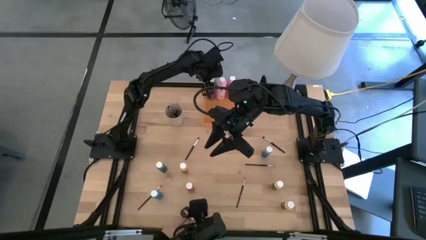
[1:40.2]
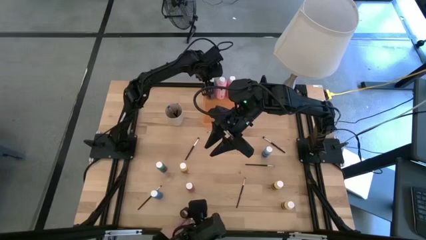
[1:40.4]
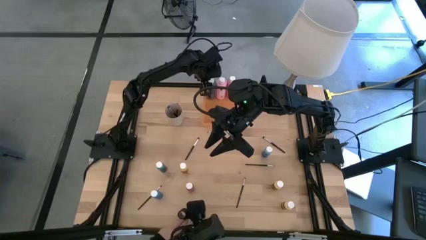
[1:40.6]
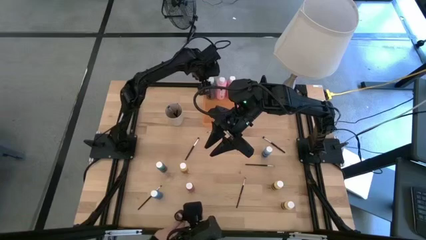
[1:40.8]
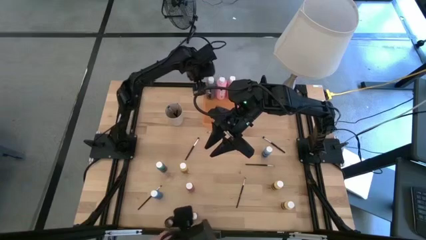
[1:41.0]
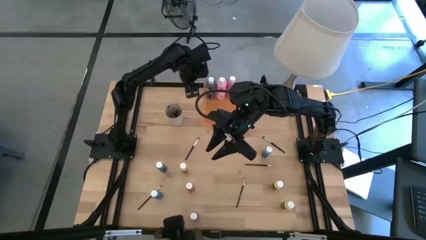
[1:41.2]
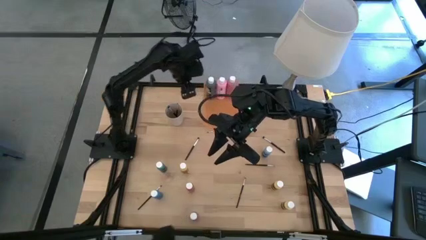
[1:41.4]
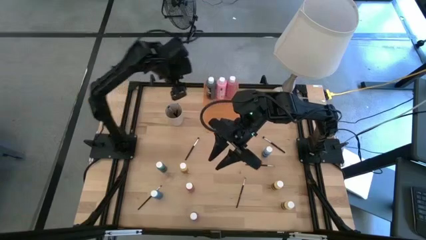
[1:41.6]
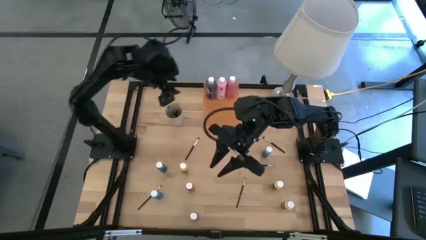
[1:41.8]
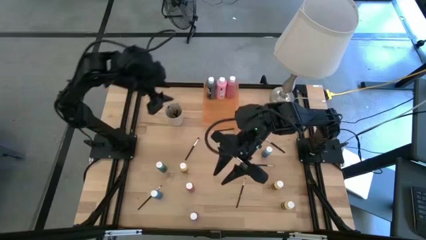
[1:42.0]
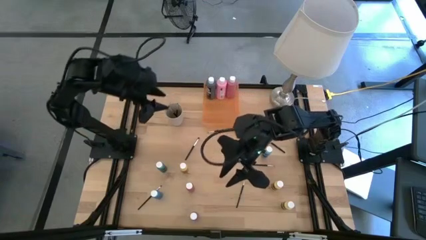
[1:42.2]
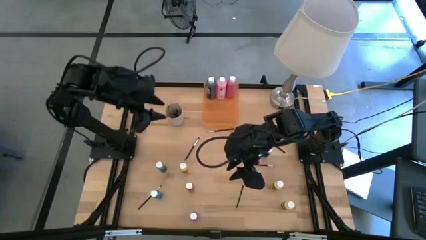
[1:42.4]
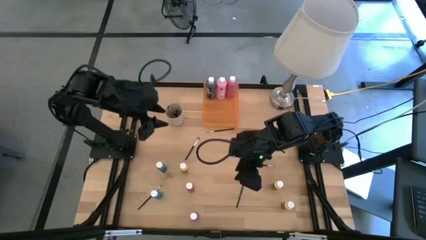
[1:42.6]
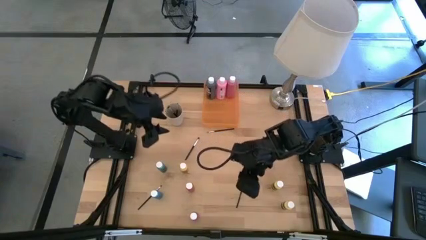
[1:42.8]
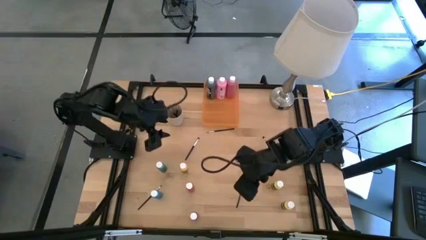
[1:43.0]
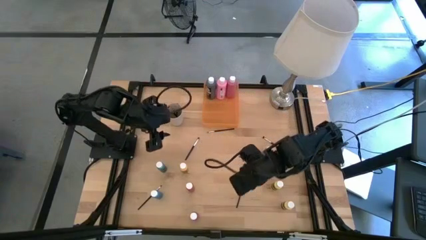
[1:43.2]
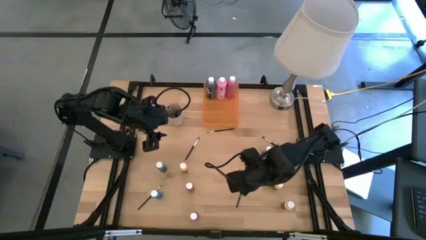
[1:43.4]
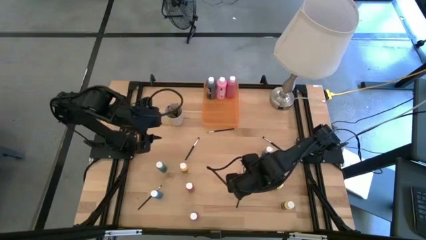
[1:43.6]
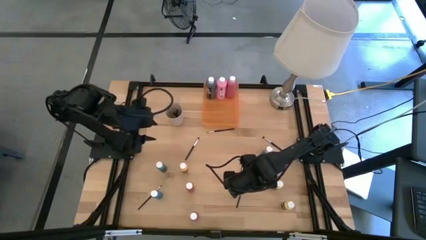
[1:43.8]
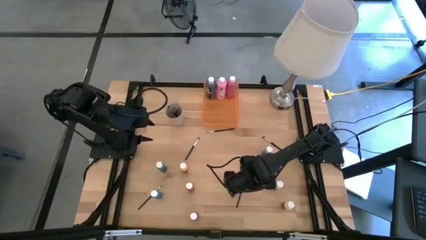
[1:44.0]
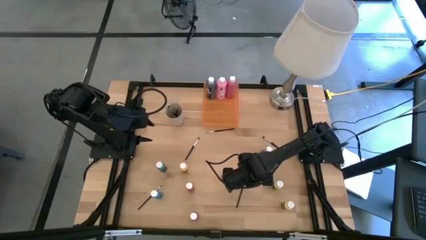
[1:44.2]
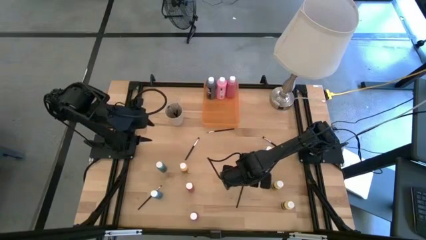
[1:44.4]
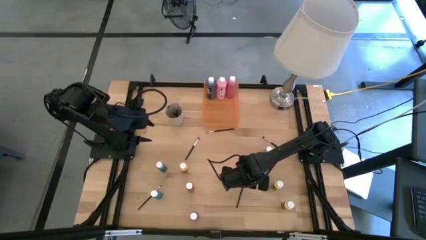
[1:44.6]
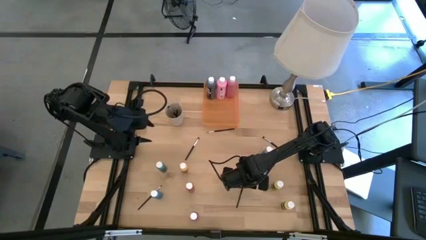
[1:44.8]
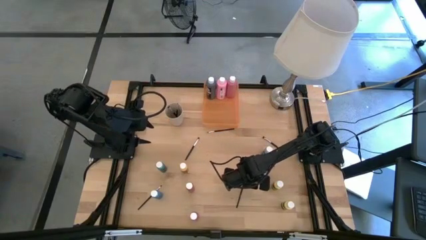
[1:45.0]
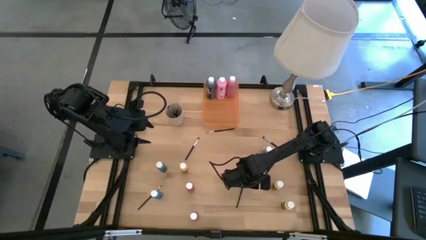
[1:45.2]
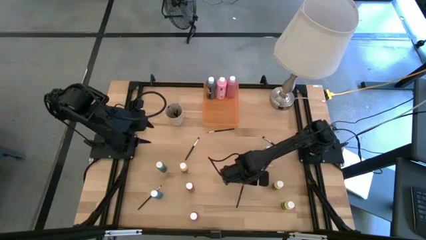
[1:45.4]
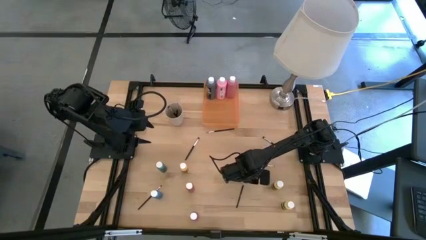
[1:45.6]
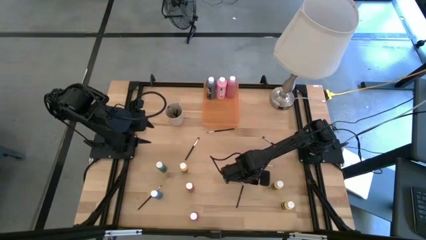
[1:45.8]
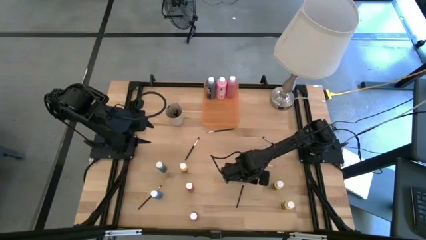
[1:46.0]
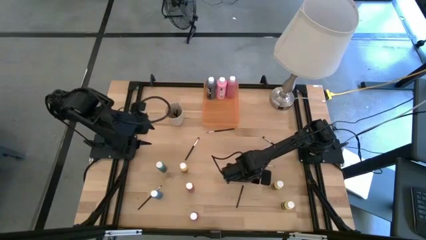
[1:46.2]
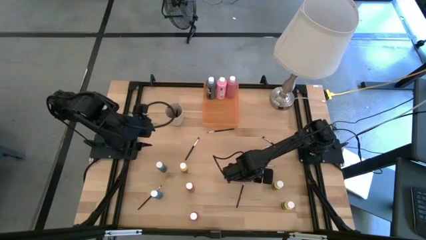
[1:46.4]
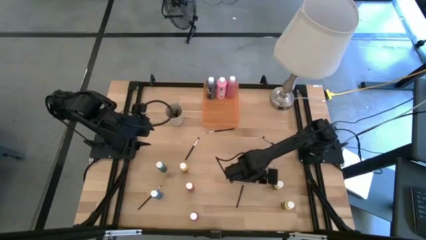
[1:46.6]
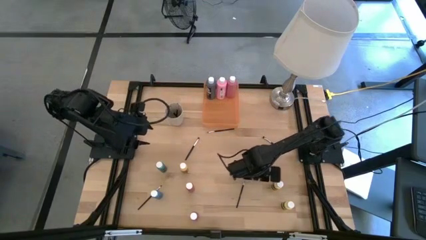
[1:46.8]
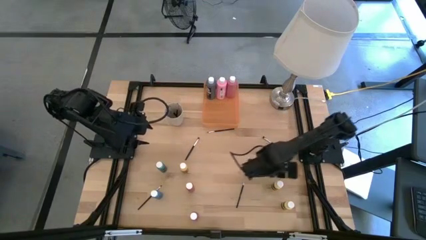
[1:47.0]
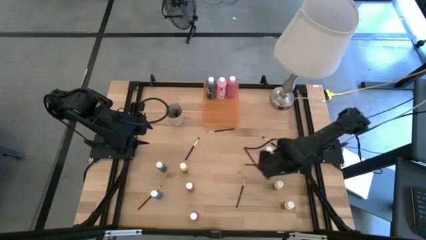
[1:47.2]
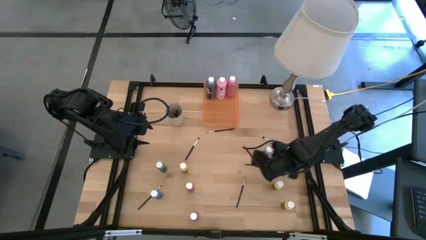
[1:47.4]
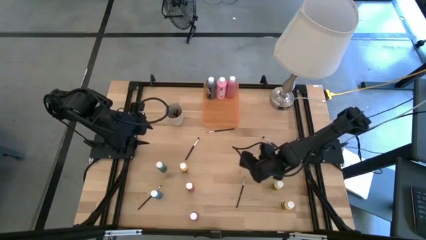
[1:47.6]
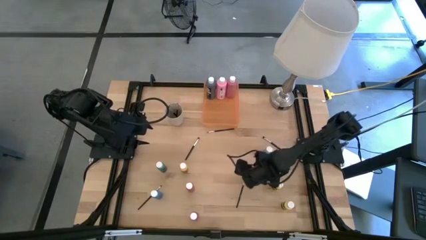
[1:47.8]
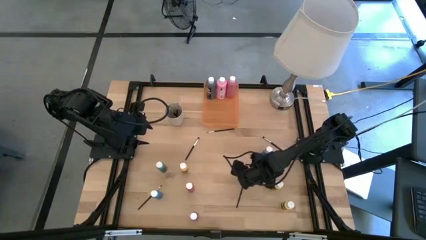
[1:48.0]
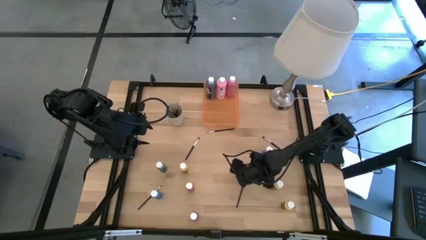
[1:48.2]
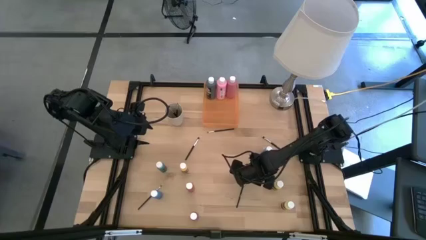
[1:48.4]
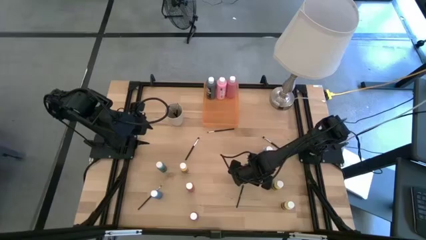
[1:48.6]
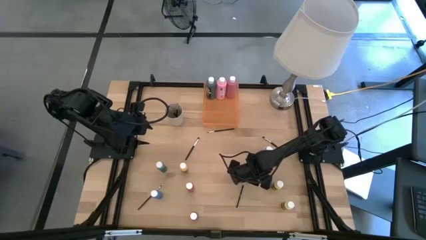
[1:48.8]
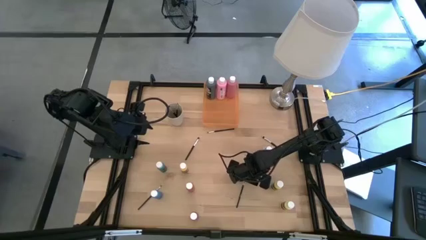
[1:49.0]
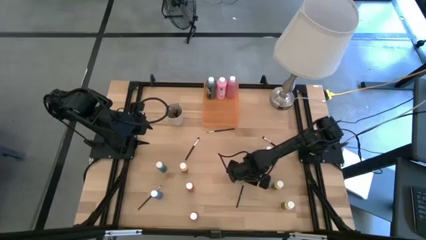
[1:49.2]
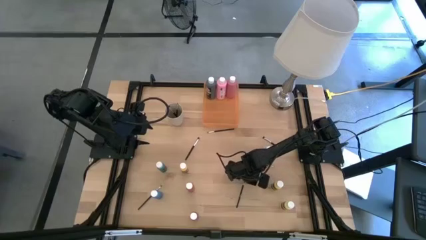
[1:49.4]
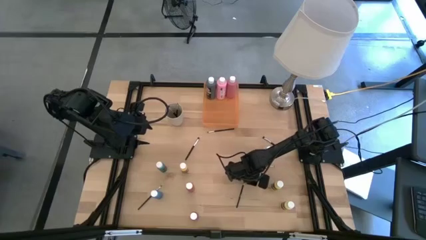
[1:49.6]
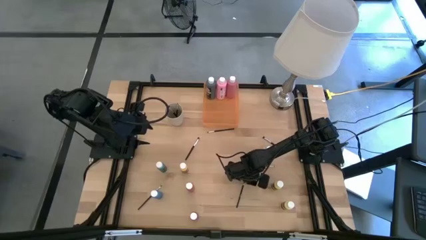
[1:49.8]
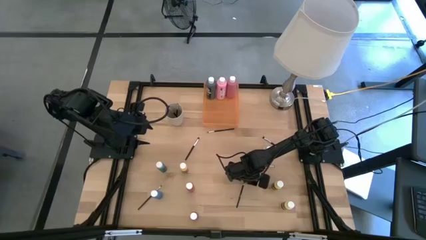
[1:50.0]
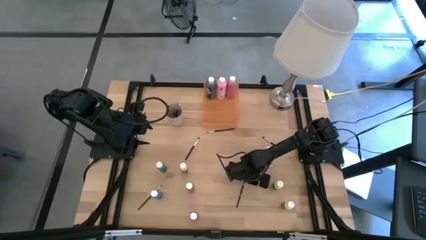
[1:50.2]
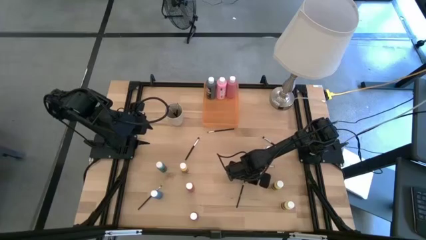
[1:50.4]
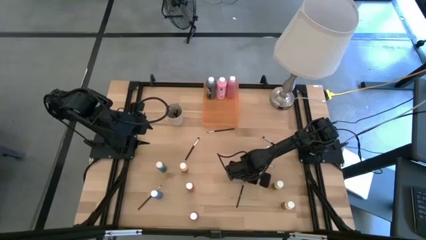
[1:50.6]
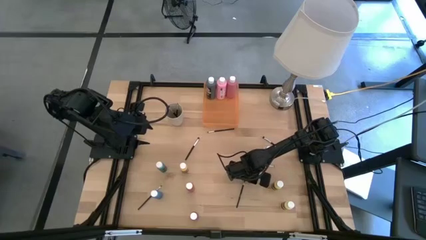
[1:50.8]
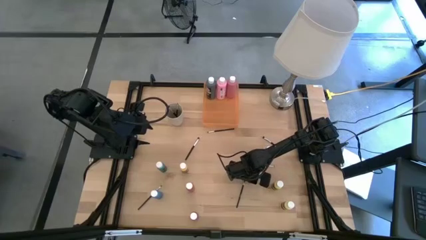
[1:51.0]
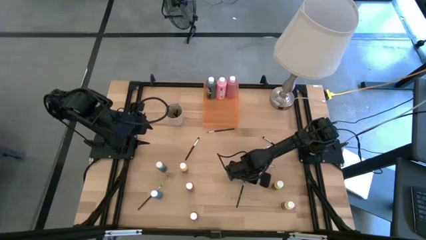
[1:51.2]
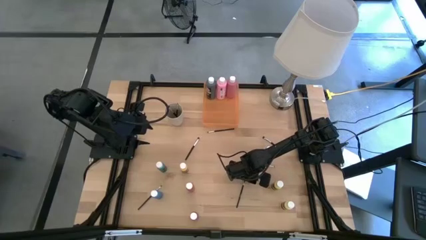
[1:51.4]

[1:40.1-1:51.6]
Task: Pick & Place Paint Supplies
Put the black paint brush into the white cup

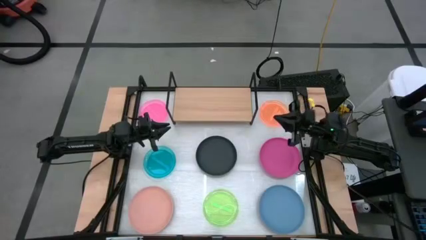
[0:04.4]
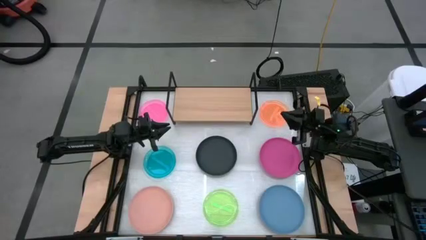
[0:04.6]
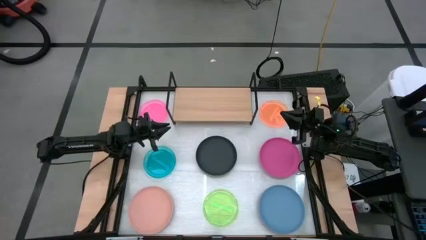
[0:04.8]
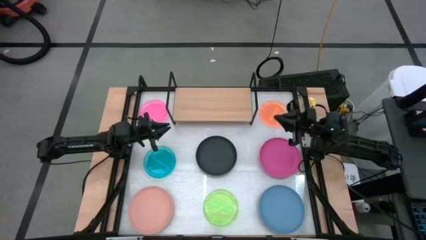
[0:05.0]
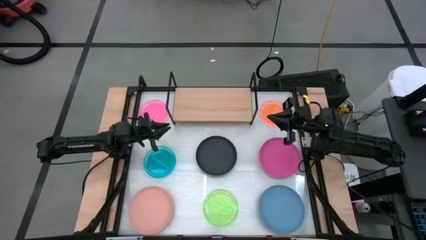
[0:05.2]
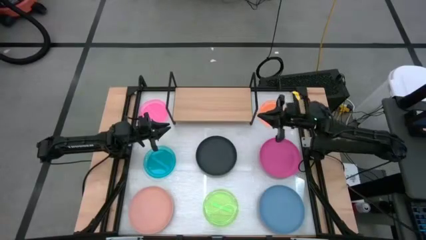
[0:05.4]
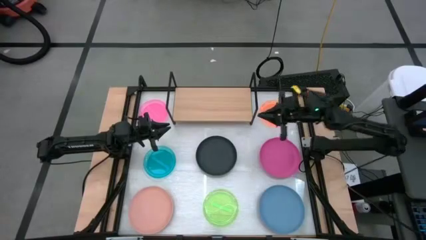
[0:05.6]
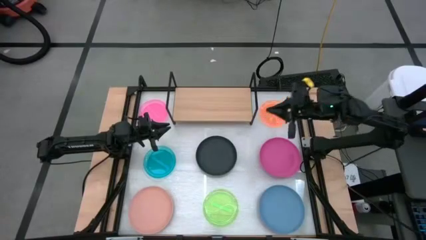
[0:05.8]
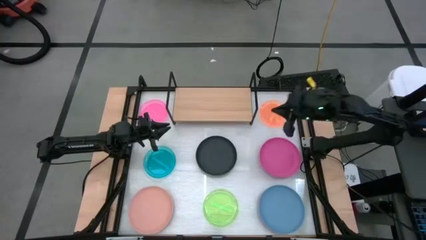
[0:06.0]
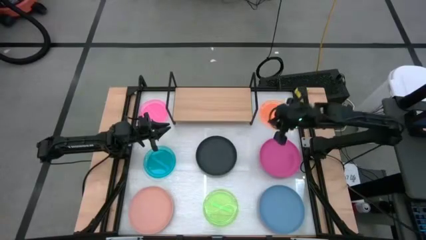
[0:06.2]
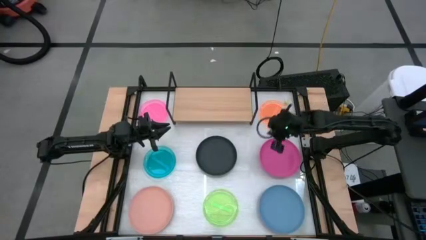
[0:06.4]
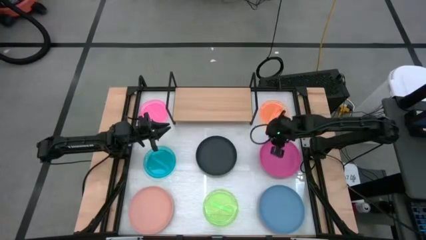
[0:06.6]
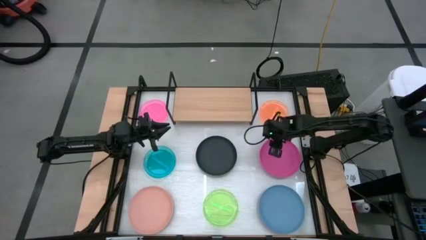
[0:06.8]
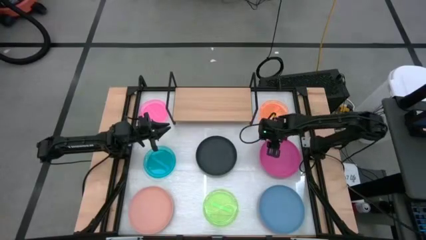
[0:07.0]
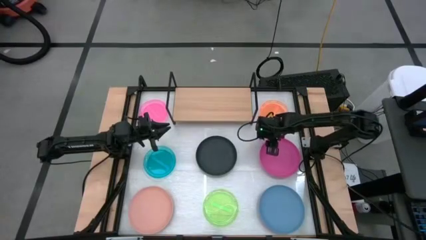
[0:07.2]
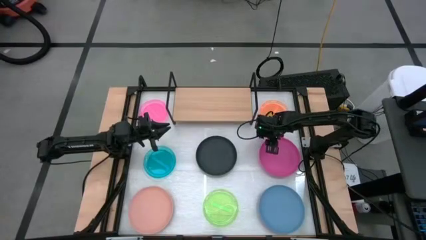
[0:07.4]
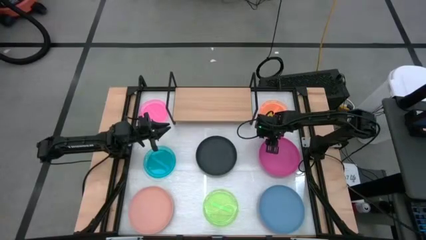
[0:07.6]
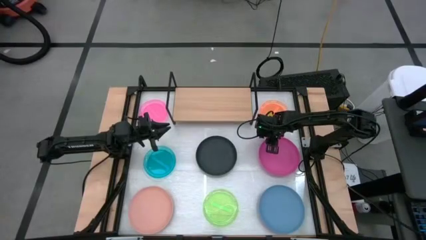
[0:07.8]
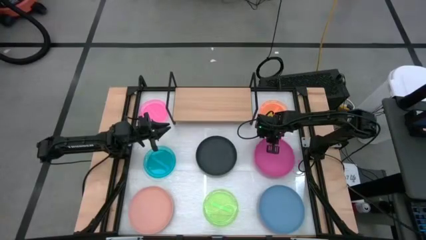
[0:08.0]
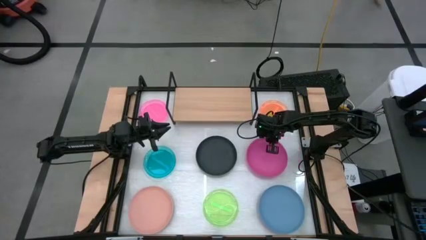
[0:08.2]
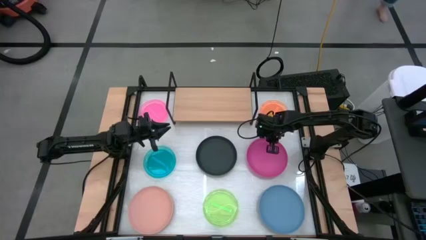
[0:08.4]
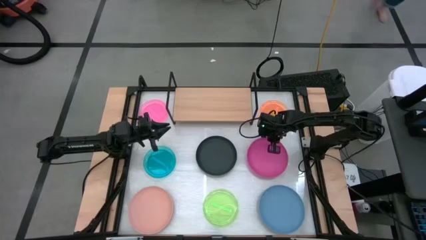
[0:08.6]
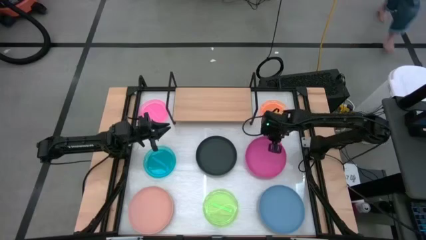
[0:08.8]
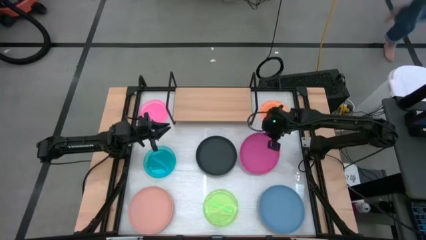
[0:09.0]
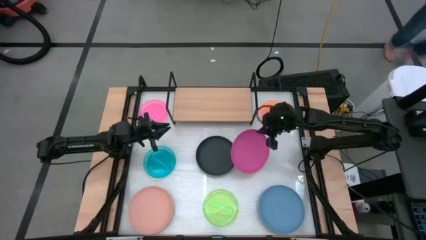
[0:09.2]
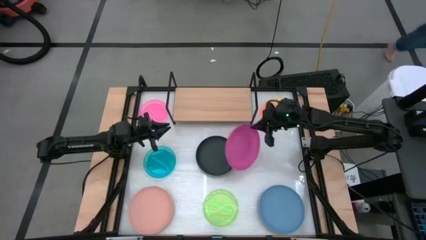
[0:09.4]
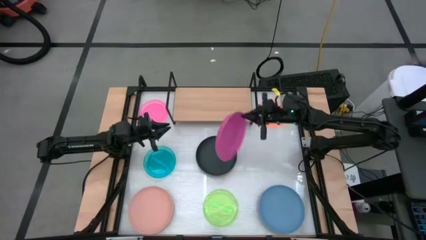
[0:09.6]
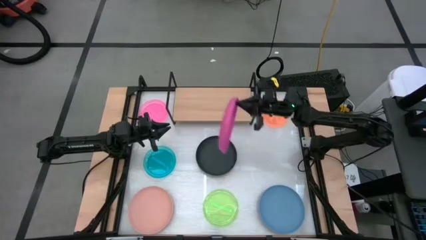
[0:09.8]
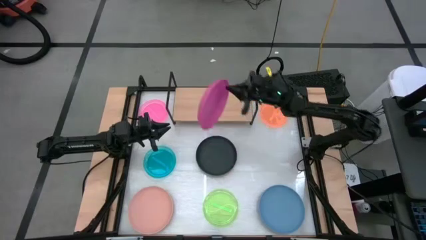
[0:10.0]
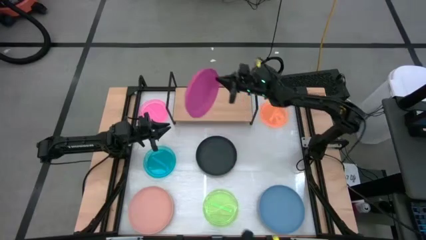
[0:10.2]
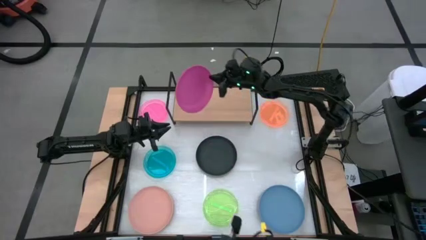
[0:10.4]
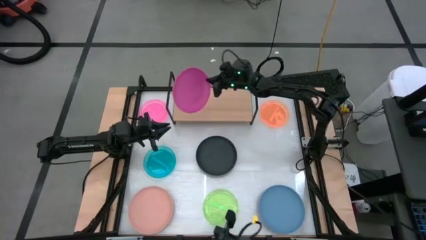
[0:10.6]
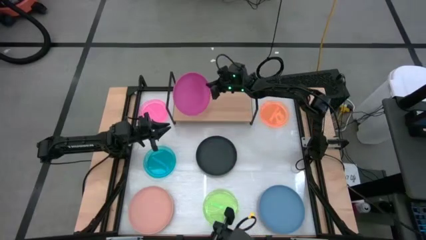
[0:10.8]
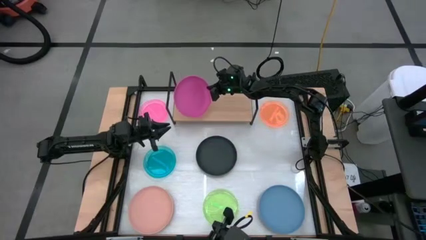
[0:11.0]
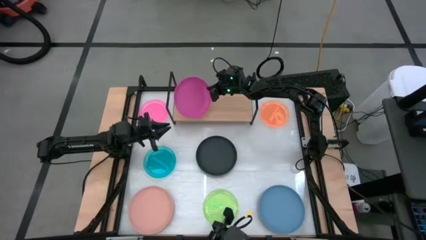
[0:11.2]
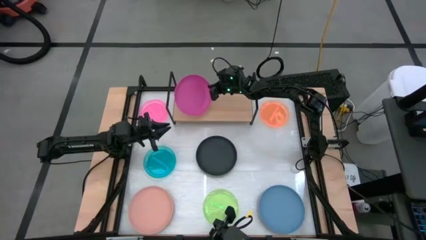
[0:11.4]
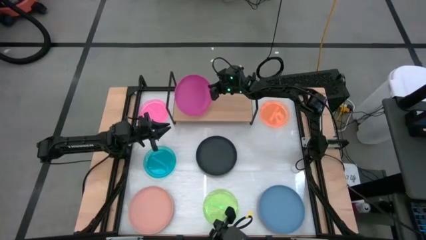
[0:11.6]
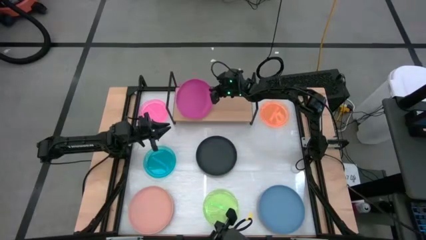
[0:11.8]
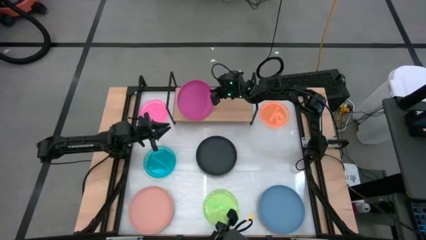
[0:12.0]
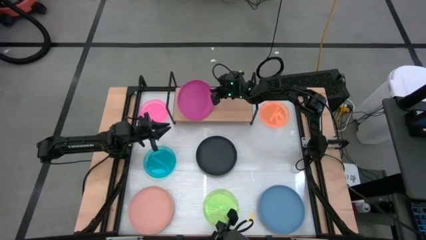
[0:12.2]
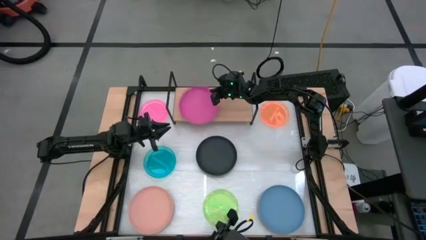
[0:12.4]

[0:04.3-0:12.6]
Task: Place and stack plates onto a shelf
Put the pink plate on the shelf
